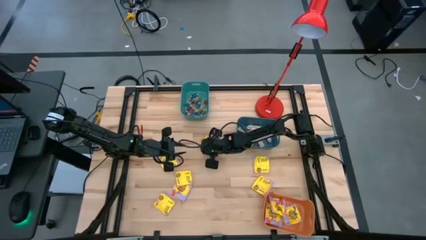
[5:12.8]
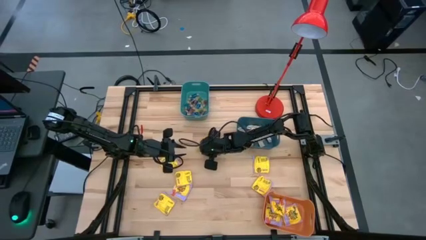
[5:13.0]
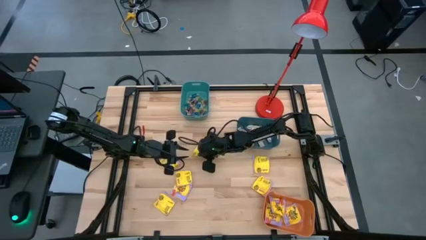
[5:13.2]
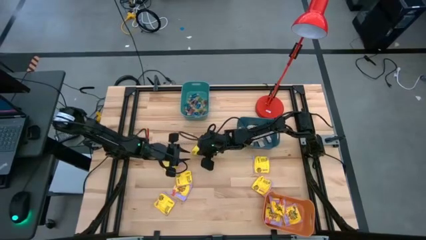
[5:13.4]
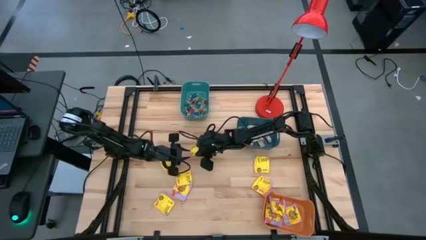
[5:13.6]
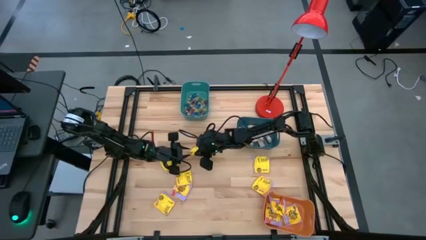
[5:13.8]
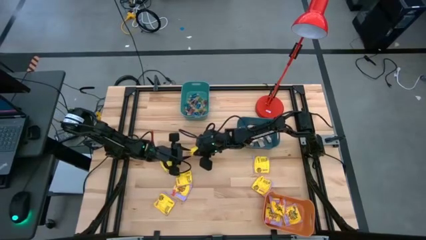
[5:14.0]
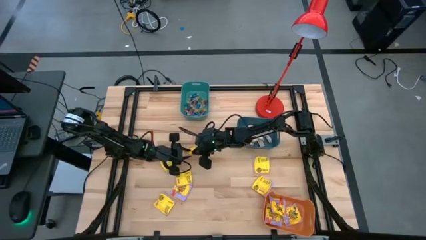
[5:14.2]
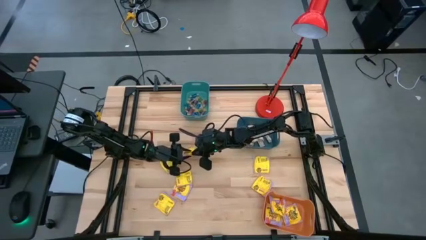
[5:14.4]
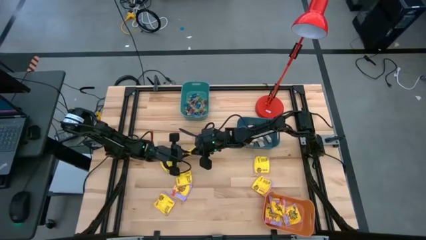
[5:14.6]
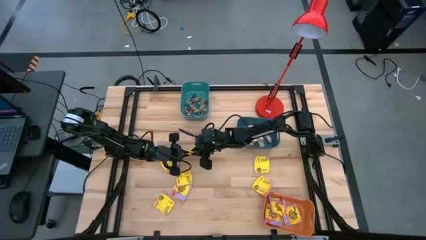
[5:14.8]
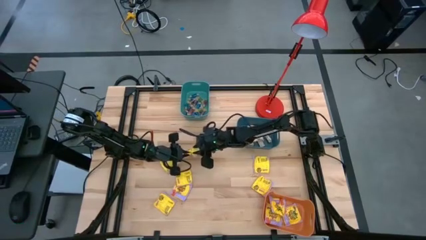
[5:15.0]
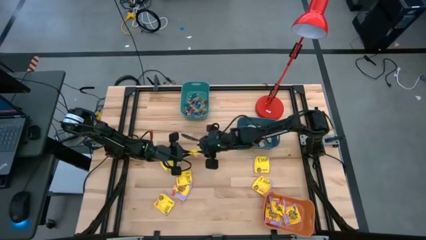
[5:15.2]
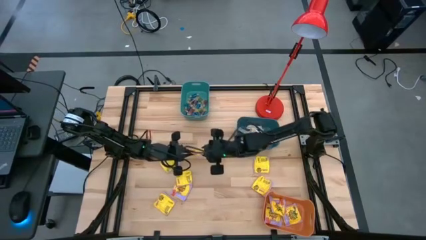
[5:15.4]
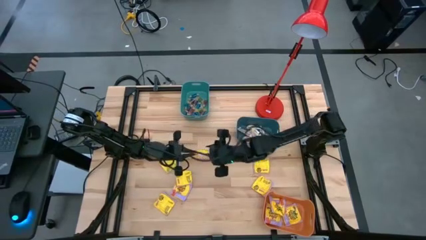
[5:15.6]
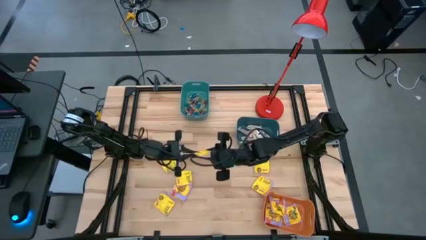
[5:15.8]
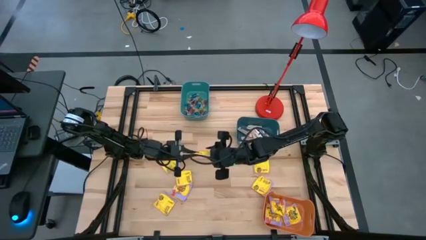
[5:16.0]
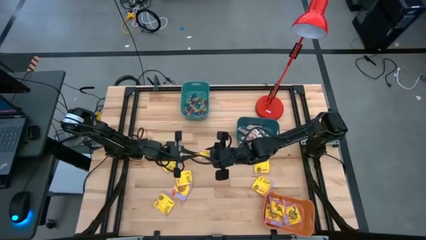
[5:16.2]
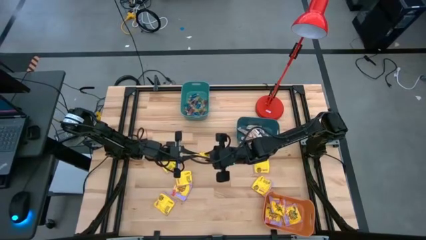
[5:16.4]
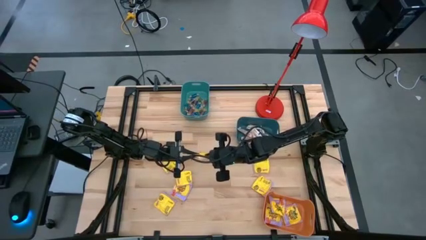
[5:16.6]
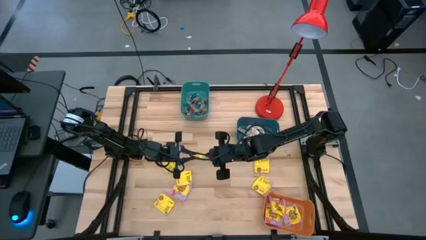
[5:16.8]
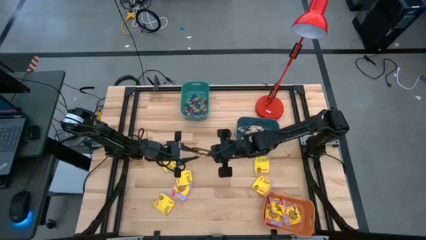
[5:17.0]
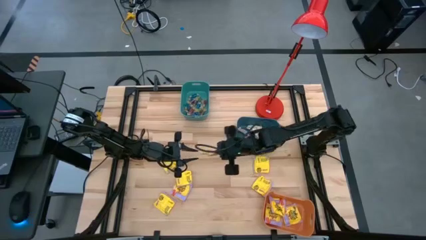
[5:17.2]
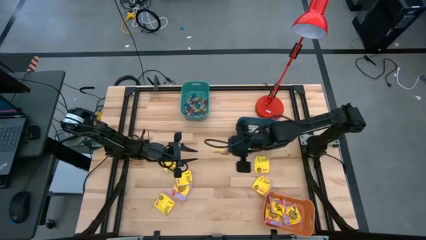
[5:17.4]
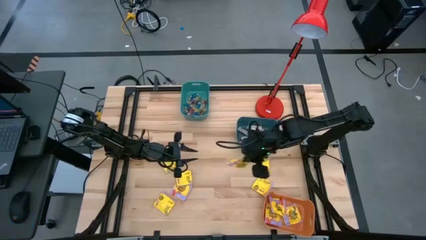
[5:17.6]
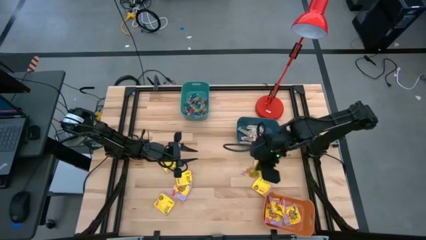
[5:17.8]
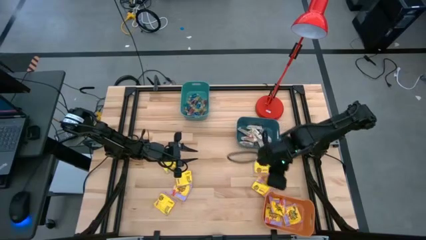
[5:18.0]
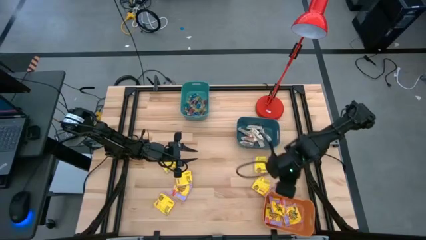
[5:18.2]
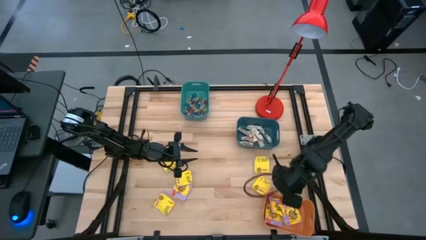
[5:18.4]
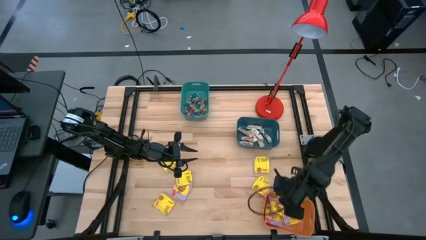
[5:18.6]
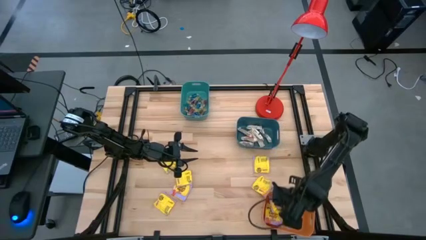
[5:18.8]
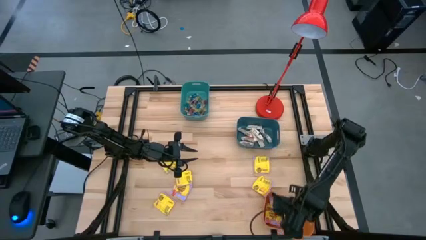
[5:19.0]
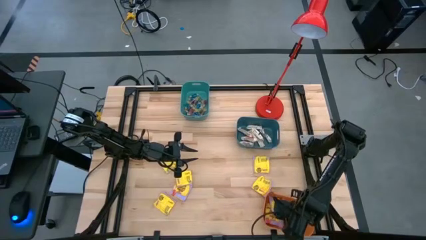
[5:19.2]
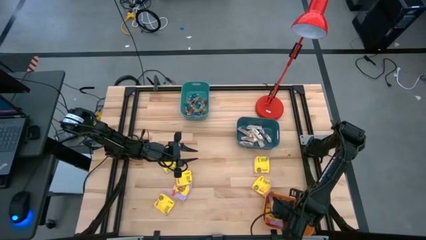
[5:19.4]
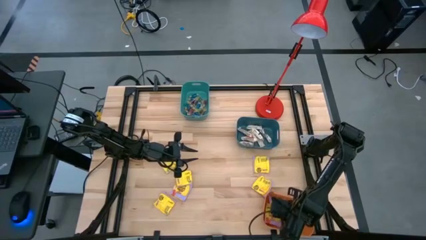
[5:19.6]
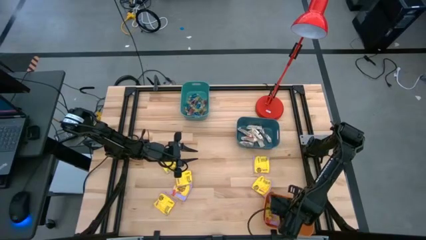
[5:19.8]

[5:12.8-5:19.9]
Task: Sort candy
Put the yellow candy bag into the orange bin

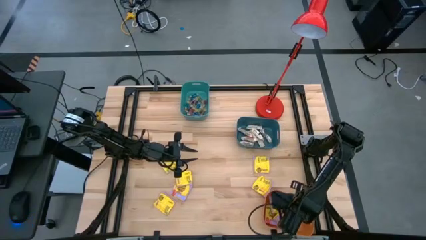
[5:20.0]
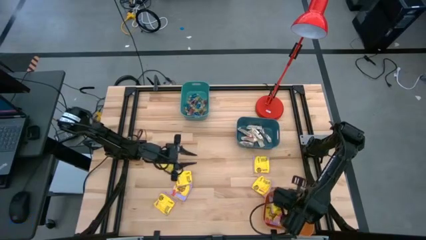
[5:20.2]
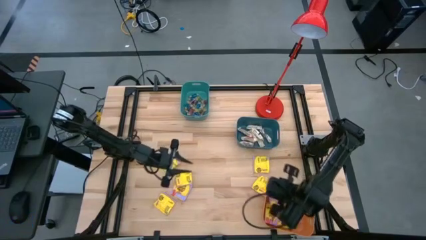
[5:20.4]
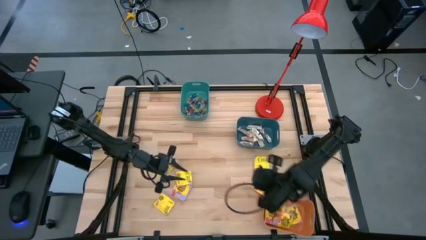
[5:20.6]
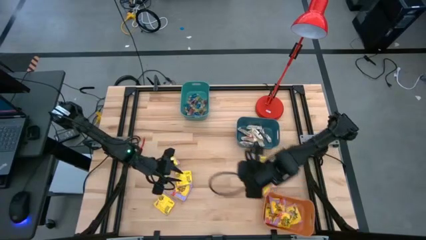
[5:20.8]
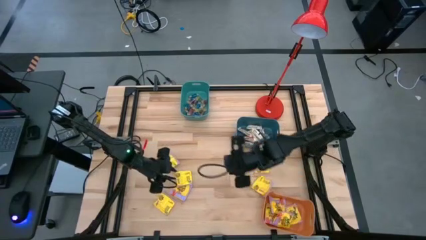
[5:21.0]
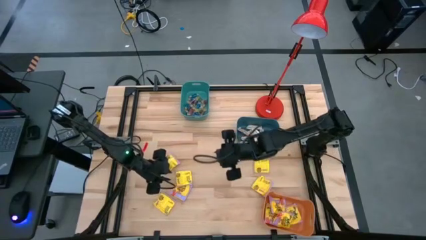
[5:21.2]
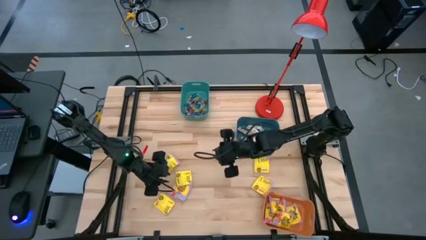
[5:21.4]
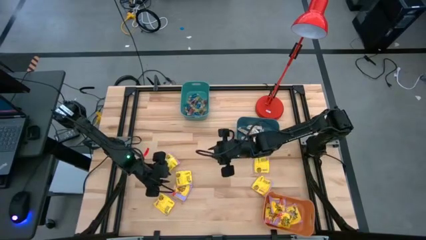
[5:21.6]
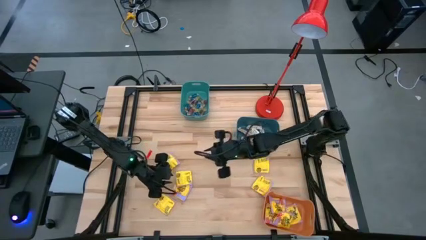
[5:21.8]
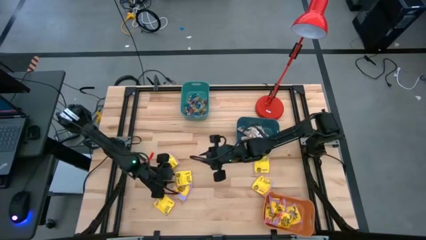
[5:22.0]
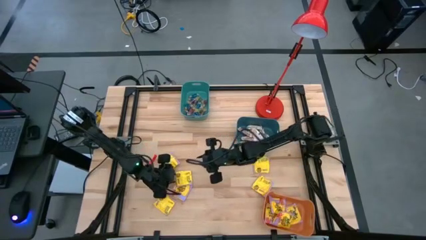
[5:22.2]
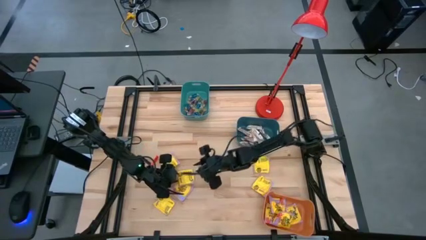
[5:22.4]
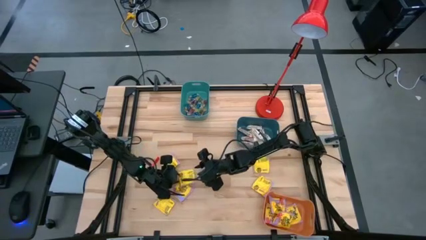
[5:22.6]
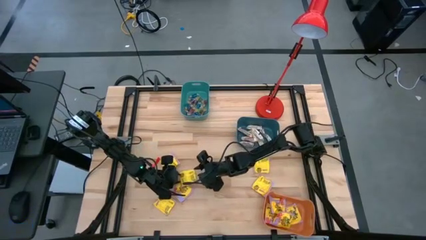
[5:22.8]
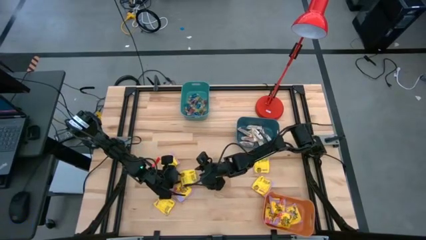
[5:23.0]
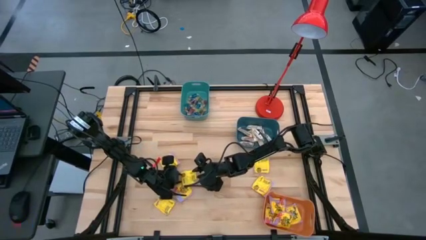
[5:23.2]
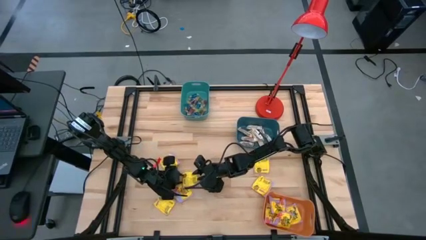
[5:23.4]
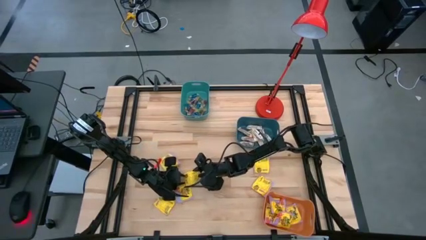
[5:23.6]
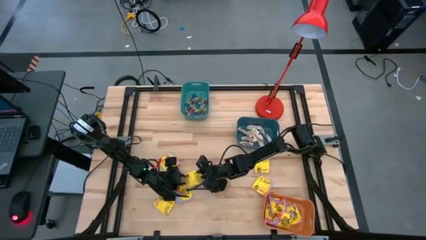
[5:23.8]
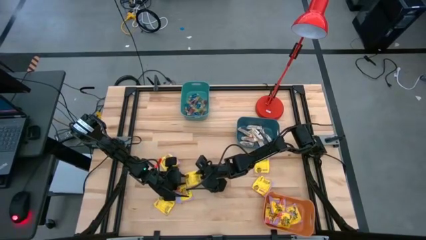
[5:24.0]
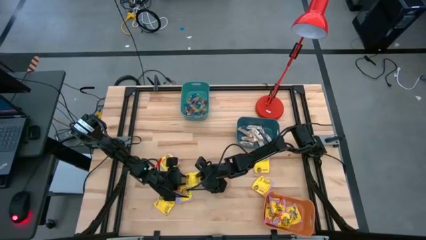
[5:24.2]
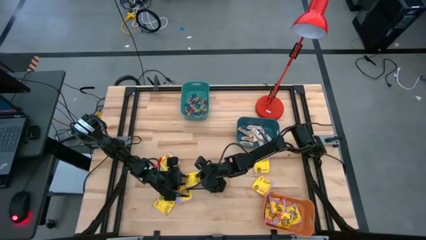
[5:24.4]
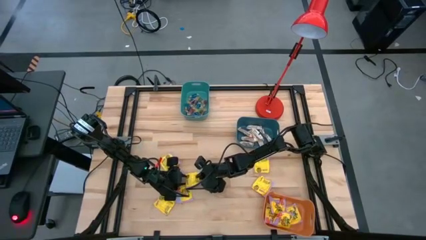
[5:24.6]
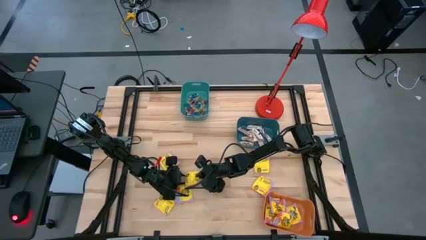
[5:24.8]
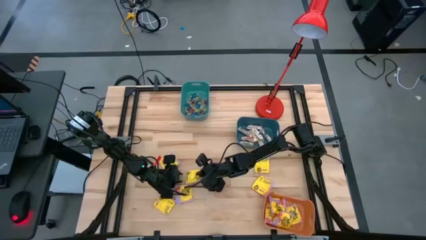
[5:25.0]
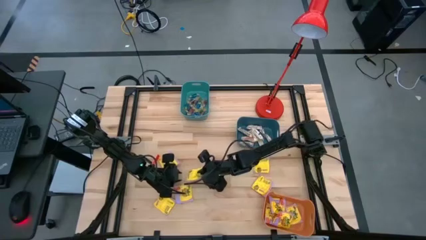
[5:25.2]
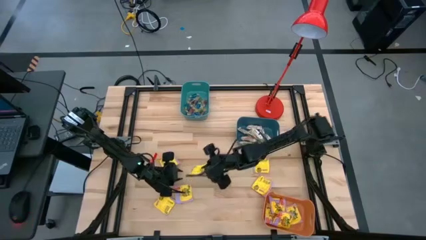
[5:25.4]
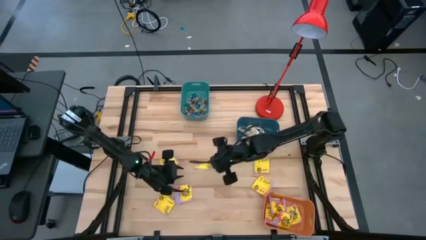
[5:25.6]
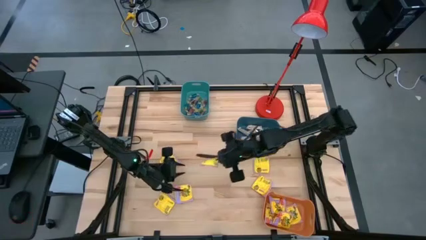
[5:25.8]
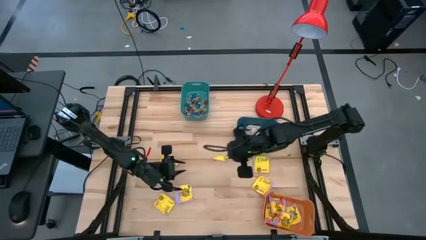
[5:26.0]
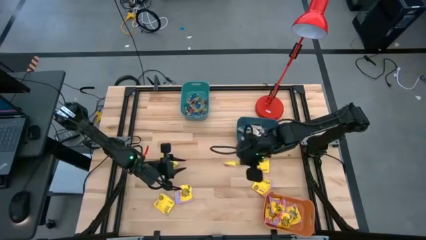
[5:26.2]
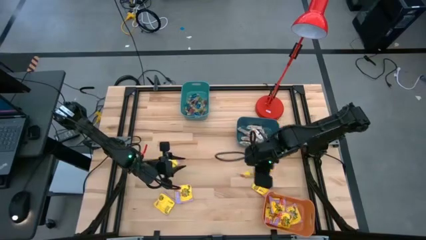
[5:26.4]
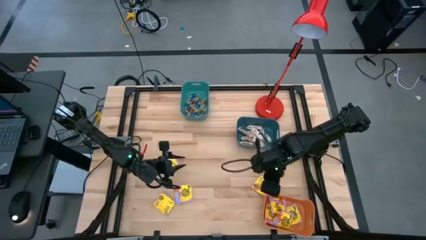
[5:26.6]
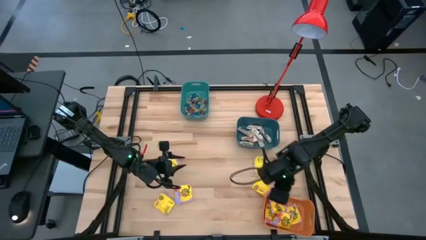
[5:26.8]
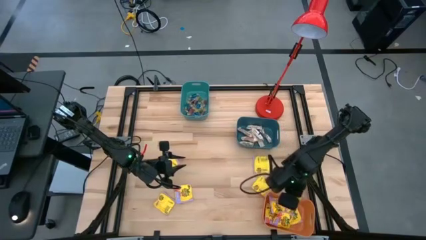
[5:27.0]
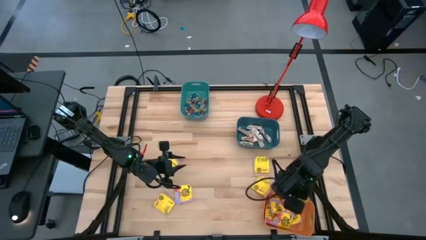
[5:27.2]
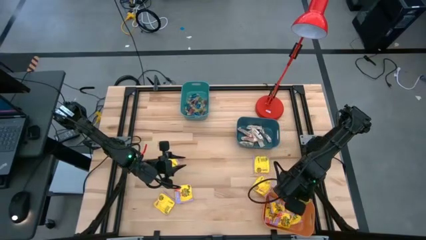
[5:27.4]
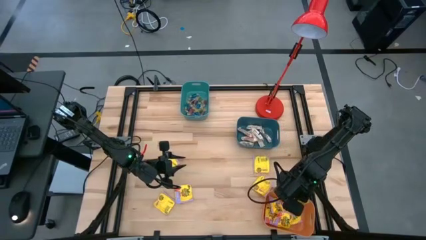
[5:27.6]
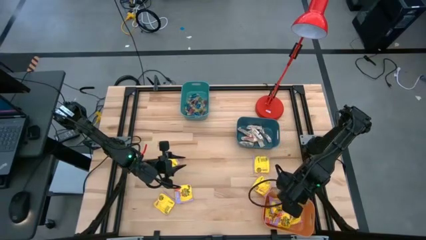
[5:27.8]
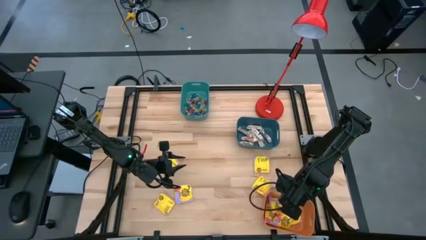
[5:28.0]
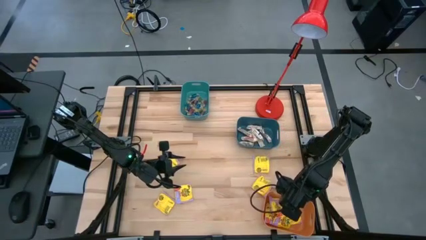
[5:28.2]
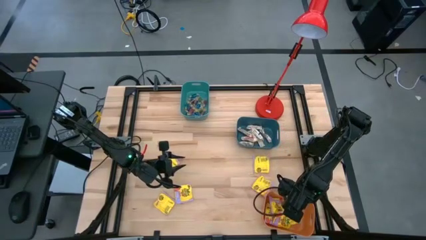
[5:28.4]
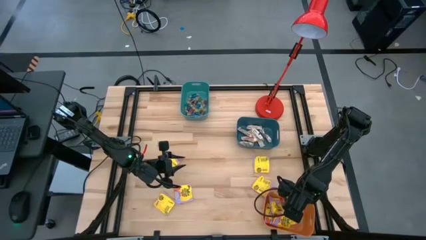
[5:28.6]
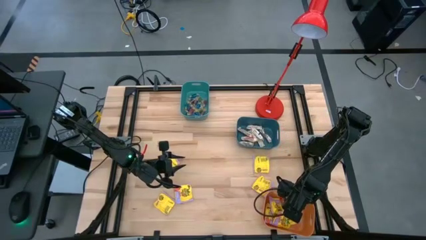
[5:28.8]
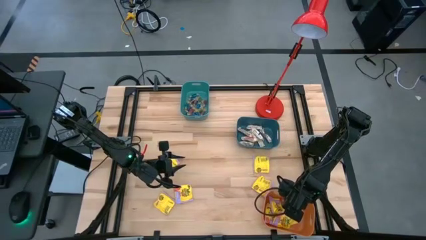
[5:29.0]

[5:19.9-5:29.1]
Put the yellow candy bag into the orange bin
